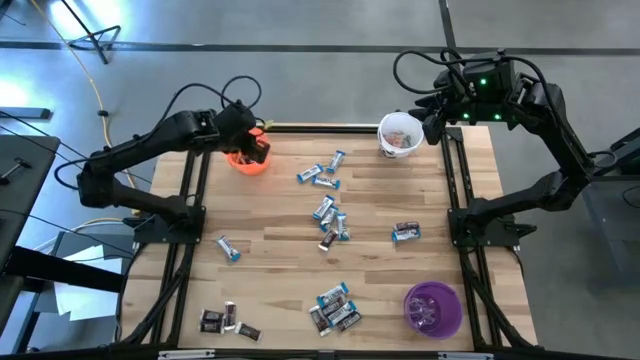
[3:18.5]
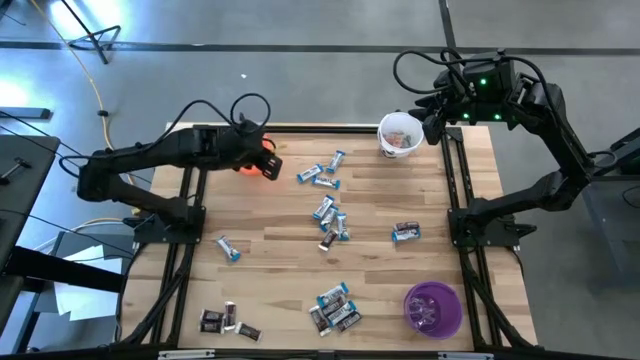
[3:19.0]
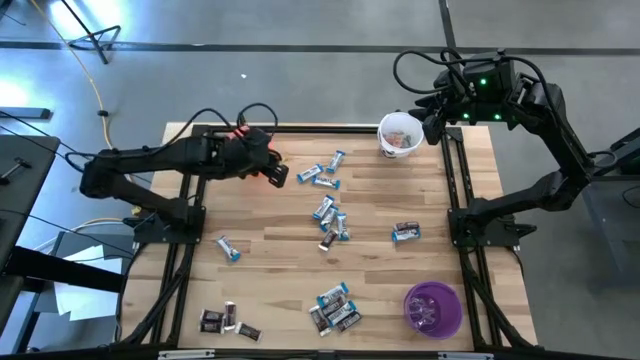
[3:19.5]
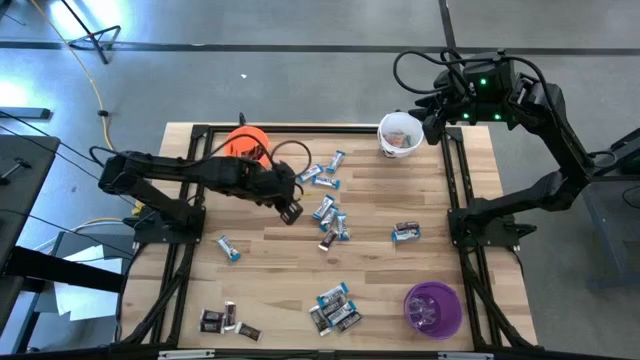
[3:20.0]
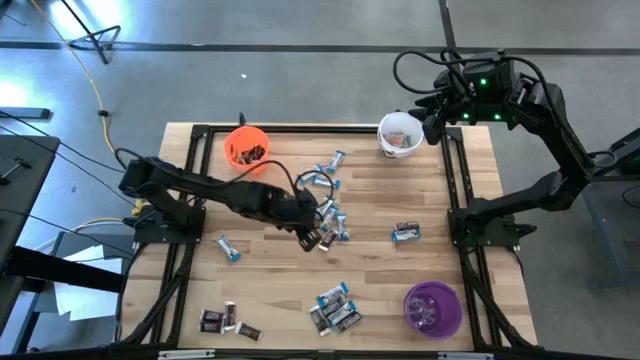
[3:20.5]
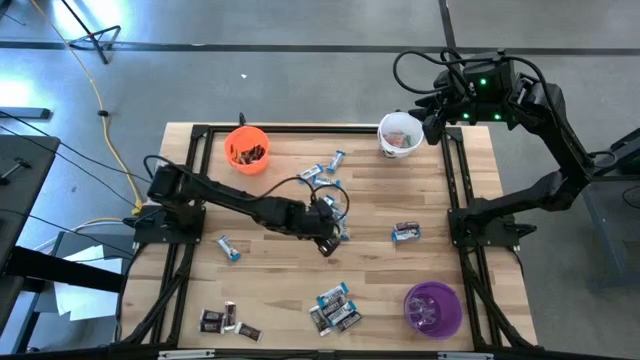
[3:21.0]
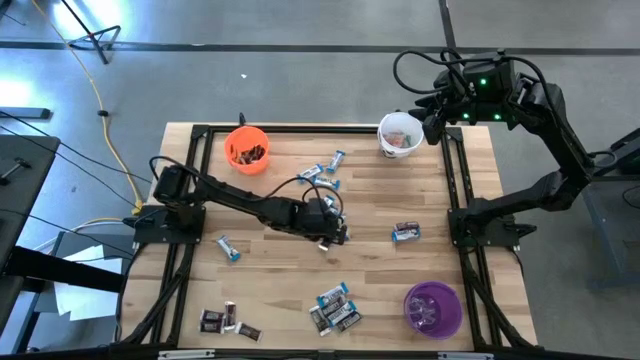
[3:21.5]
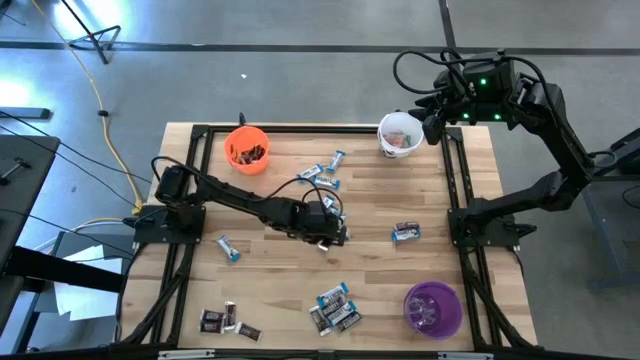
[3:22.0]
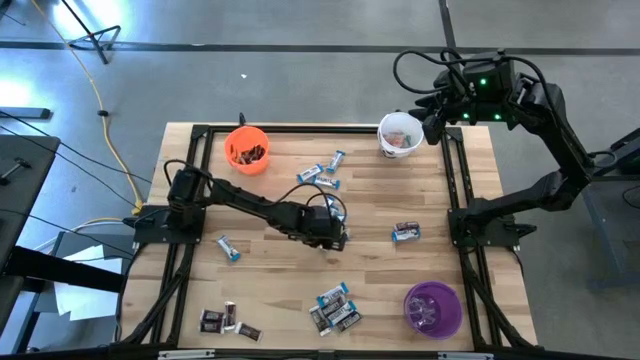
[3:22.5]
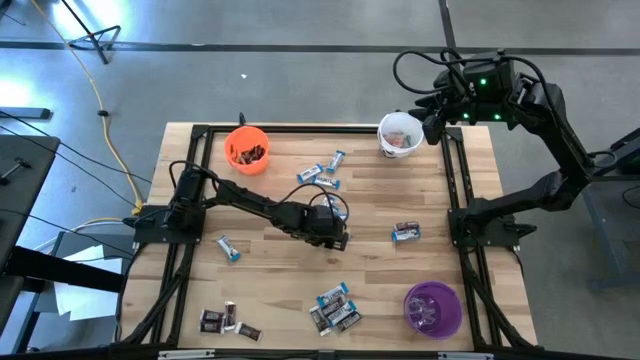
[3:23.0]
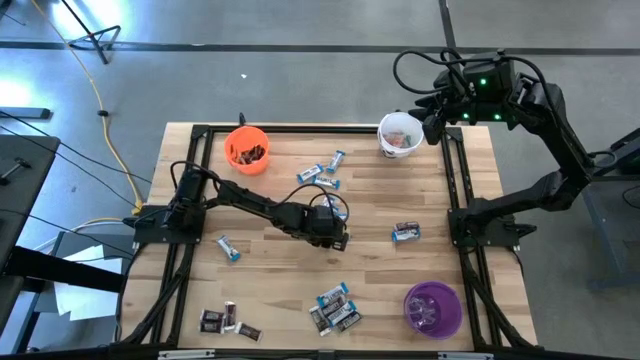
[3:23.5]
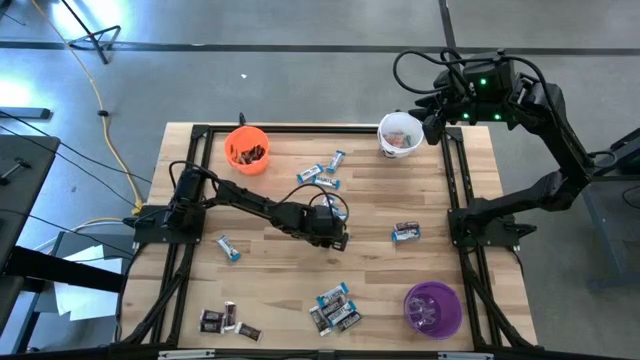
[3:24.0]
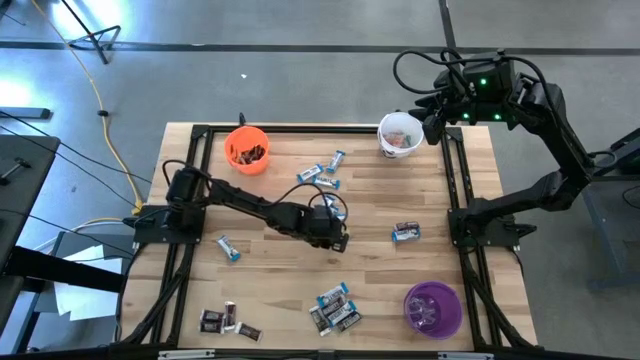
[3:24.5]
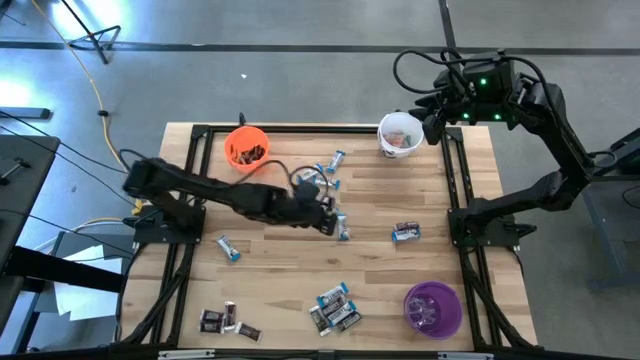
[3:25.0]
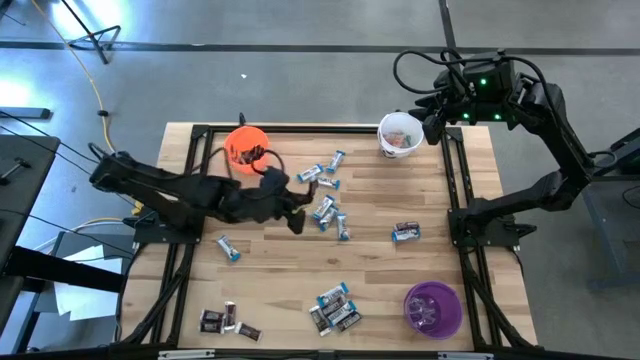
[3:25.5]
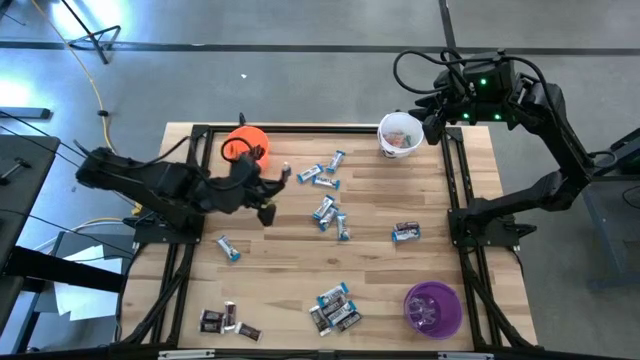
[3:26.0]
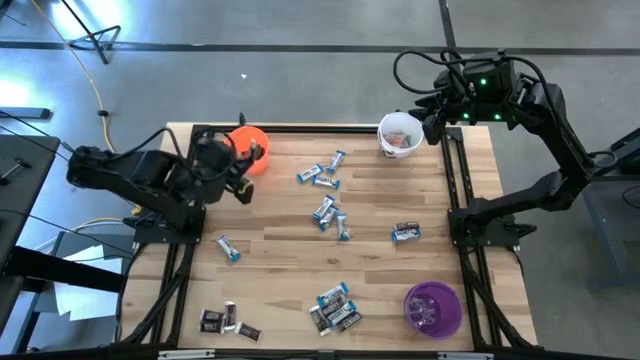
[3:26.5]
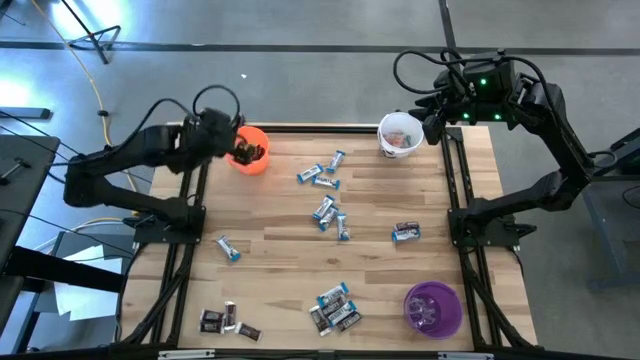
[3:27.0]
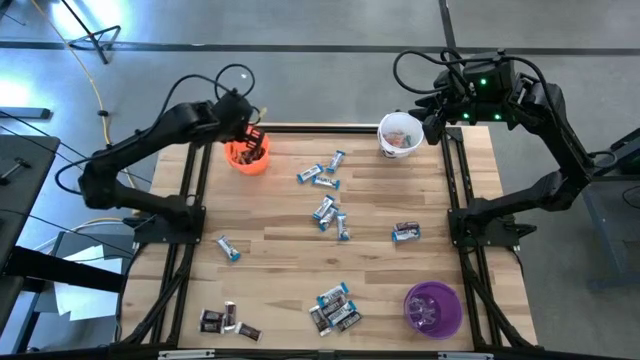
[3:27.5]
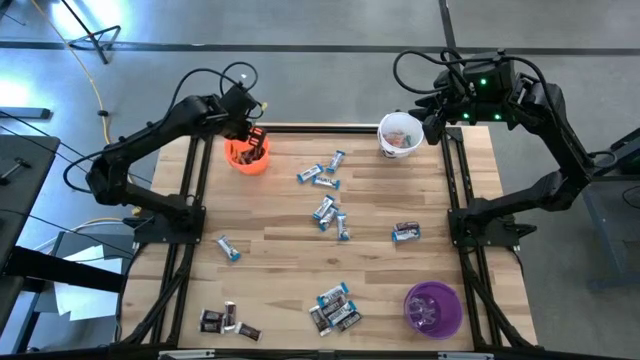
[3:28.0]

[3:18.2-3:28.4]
Task: Sort candy
Put the brown chocolate into the orange bucket

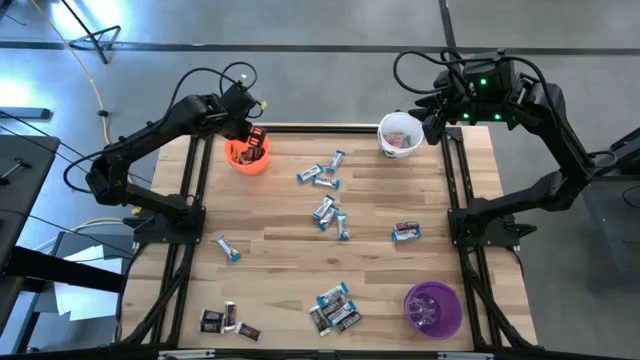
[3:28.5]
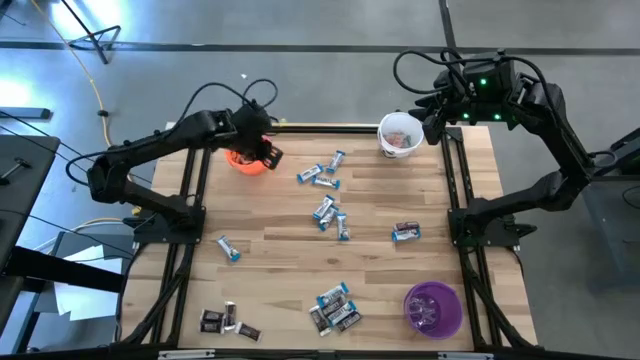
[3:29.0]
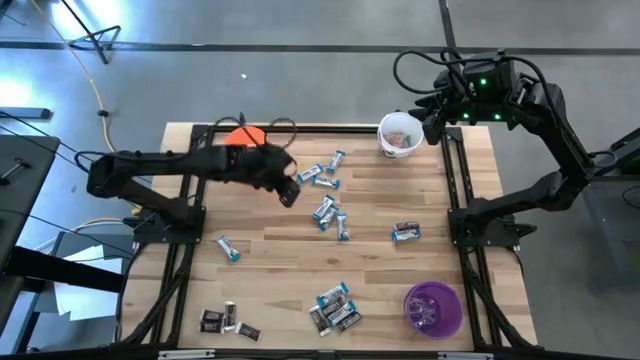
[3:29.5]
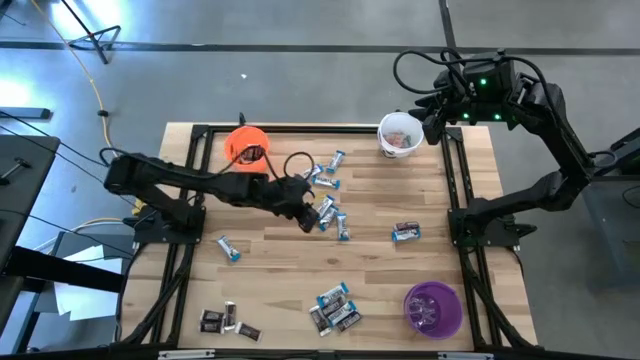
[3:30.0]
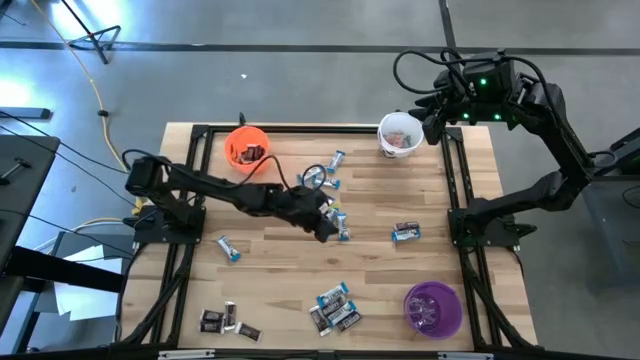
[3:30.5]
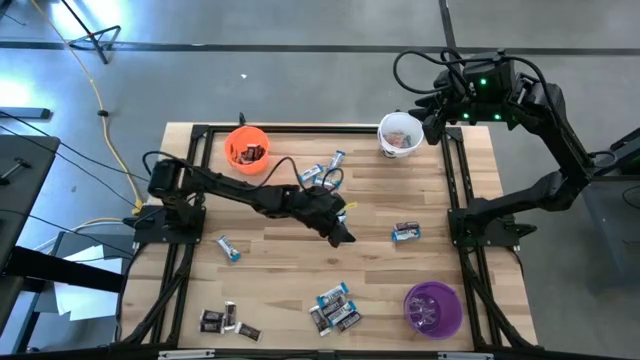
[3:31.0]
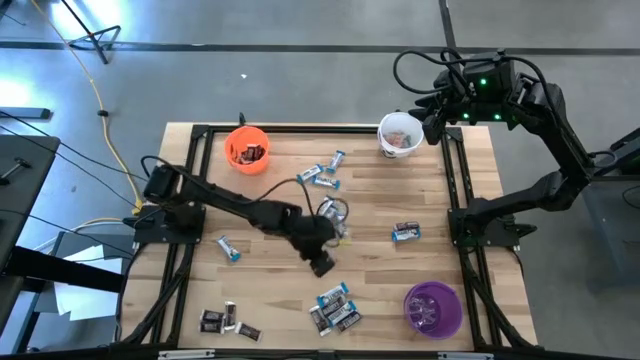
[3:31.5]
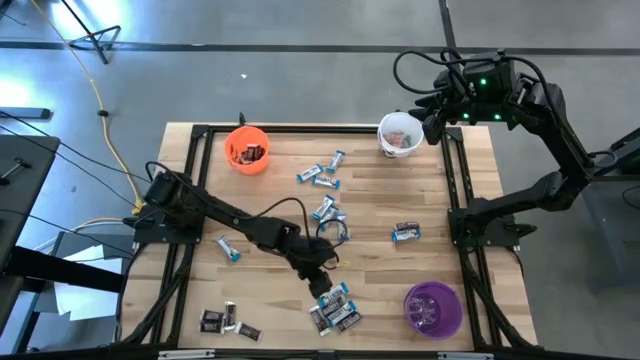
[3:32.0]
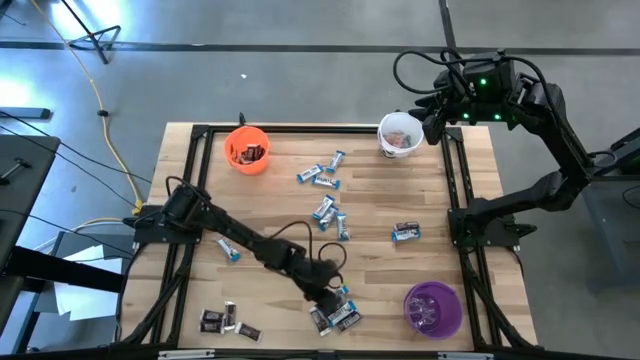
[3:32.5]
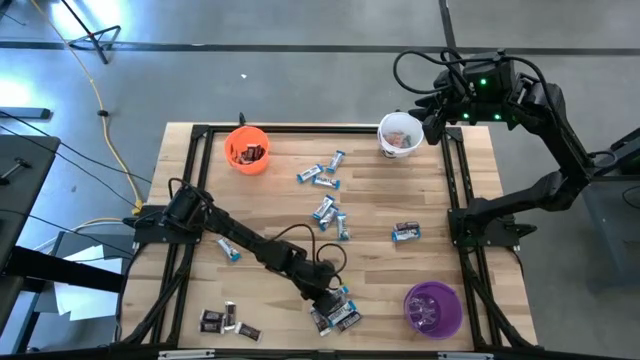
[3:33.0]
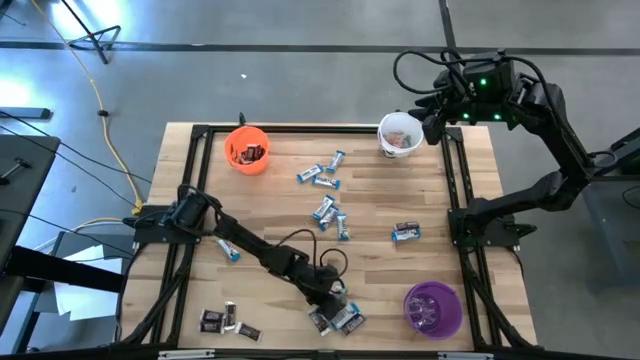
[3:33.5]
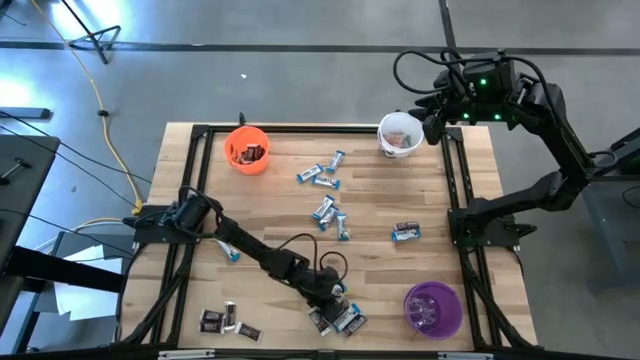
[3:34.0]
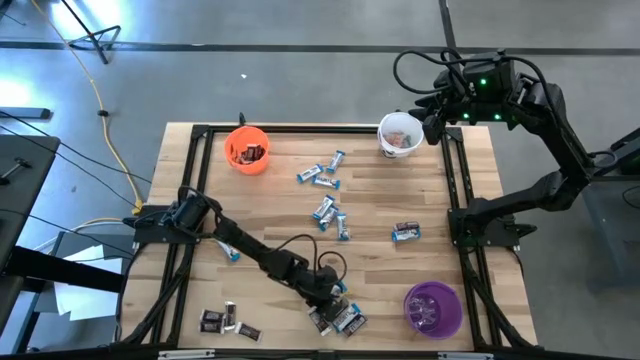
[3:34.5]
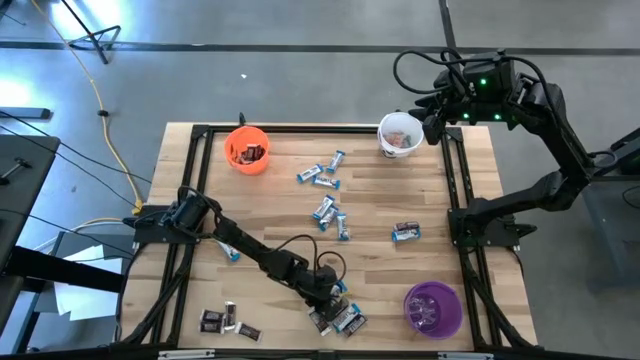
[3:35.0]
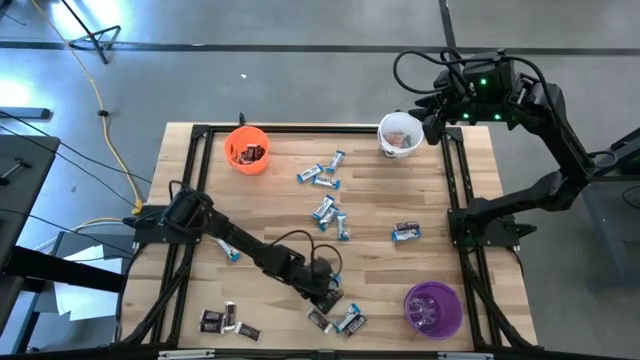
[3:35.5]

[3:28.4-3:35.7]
Put the brown chocolate into the orange bucket

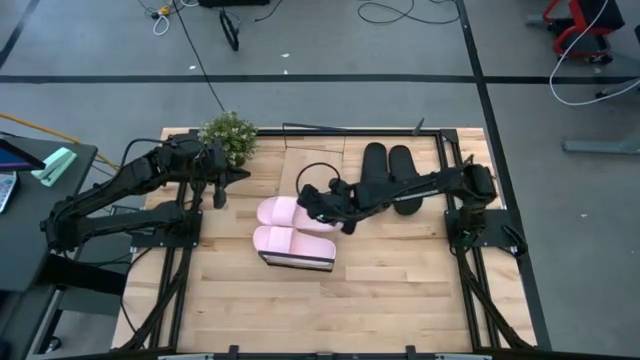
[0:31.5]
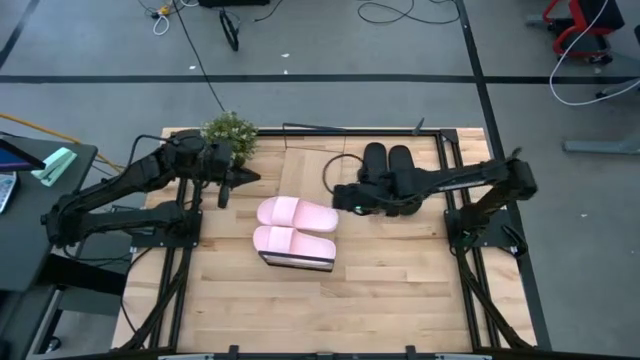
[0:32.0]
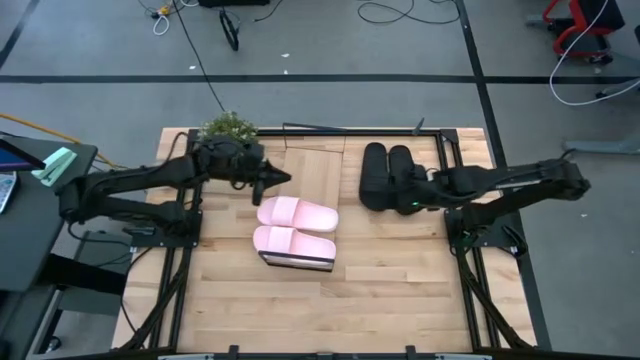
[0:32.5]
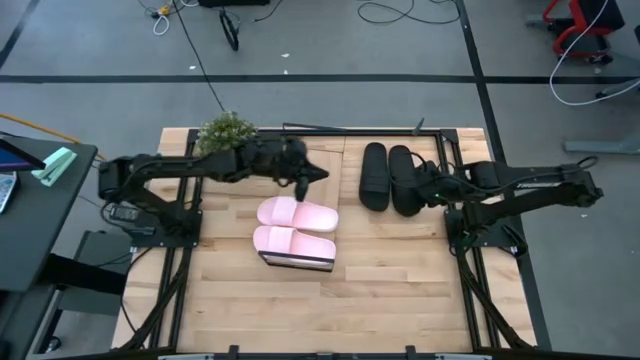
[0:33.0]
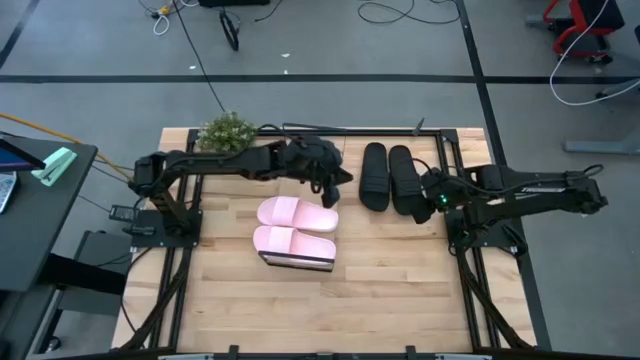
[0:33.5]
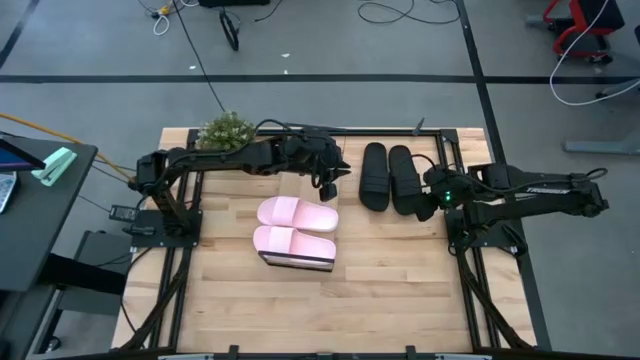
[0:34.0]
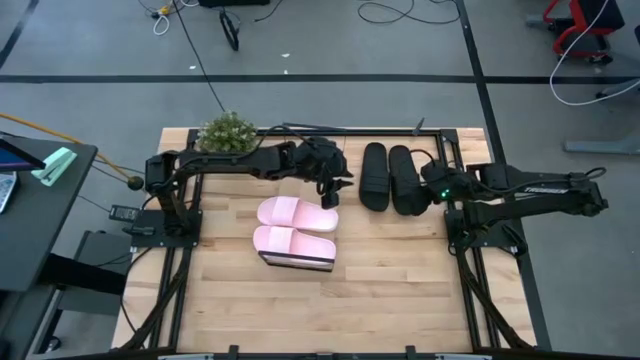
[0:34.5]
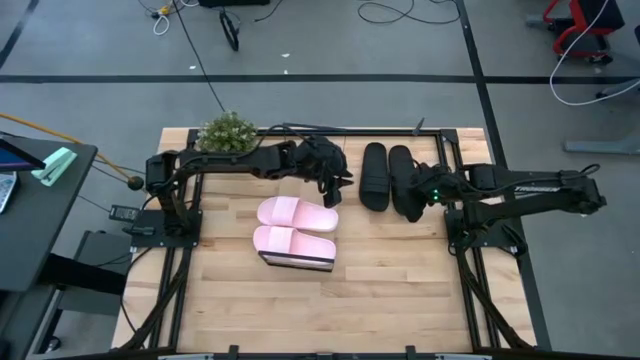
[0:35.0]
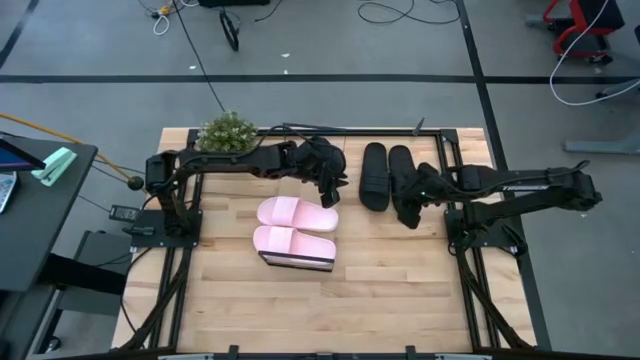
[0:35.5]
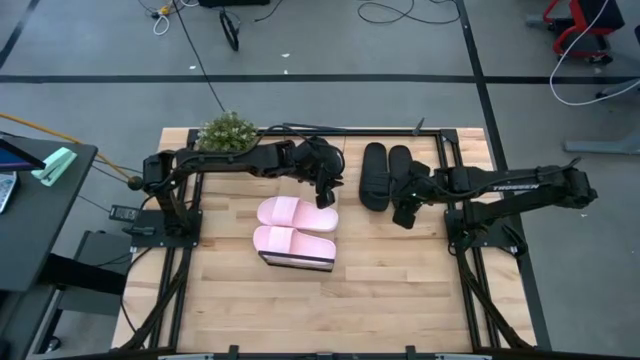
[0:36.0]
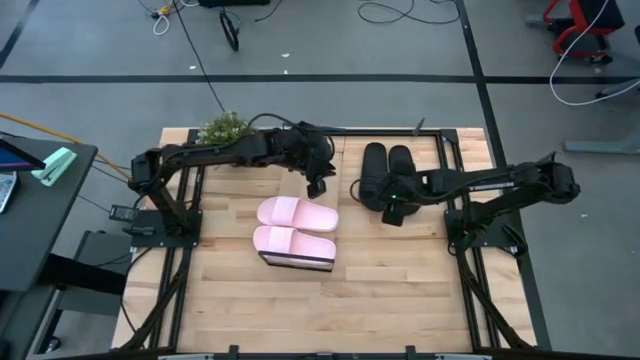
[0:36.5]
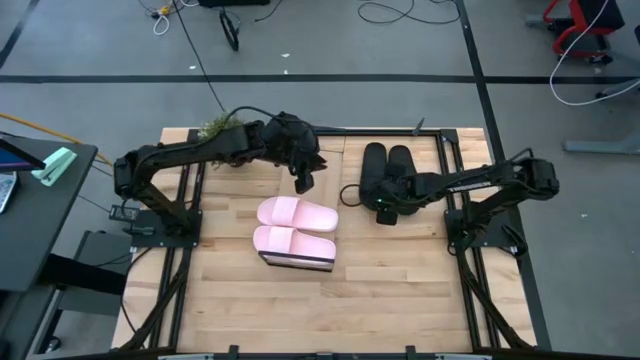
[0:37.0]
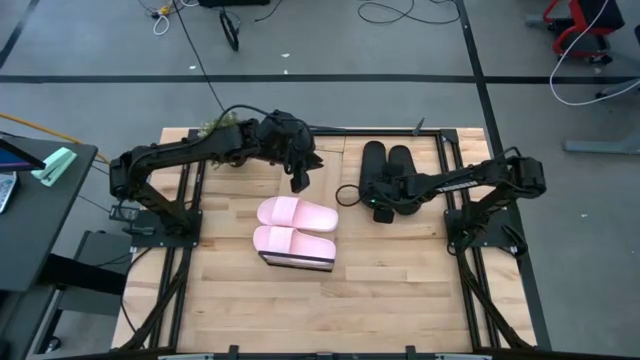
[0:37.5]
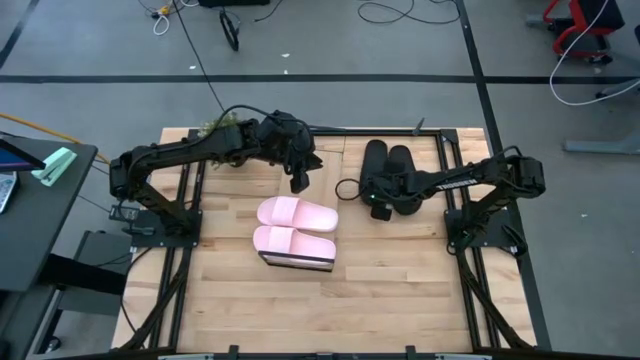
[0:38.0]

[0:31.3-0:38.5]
Task: Pick and place slides into the shelf
Put the left black slides on the shelf
